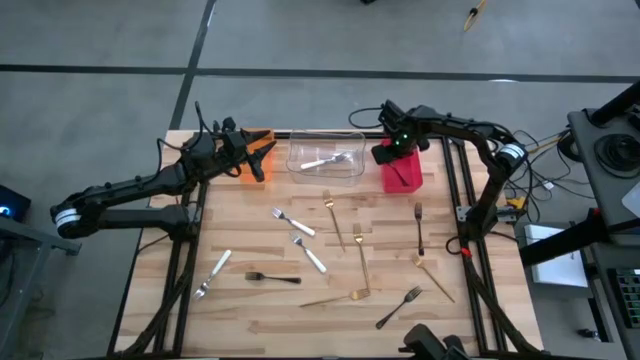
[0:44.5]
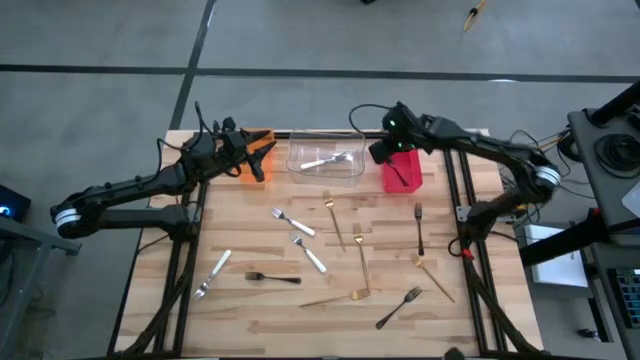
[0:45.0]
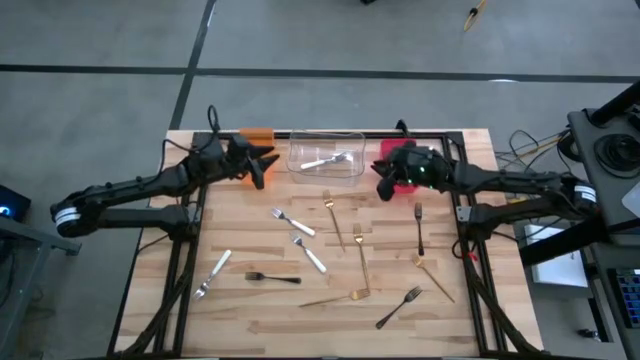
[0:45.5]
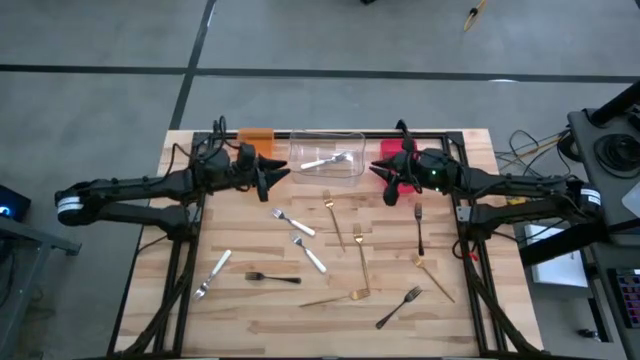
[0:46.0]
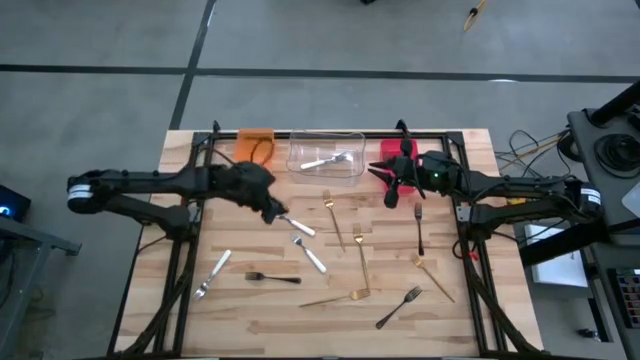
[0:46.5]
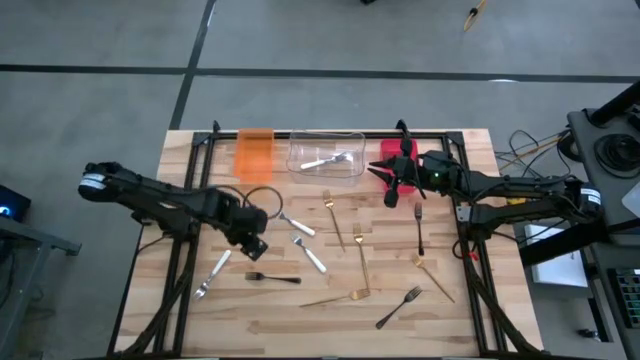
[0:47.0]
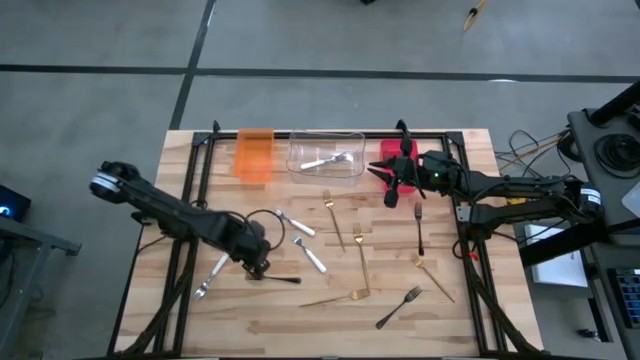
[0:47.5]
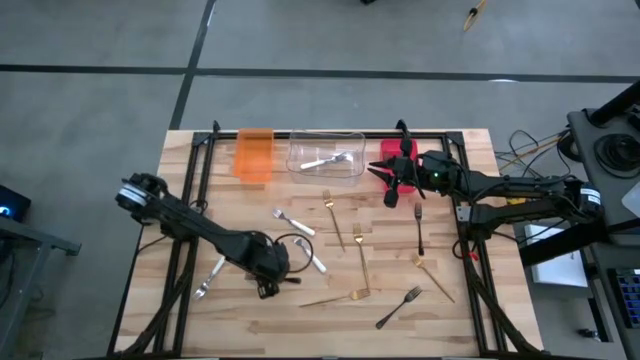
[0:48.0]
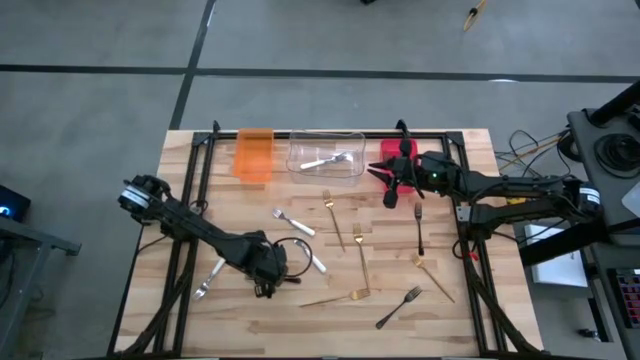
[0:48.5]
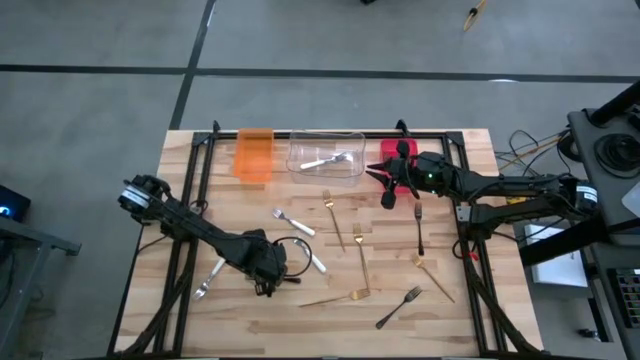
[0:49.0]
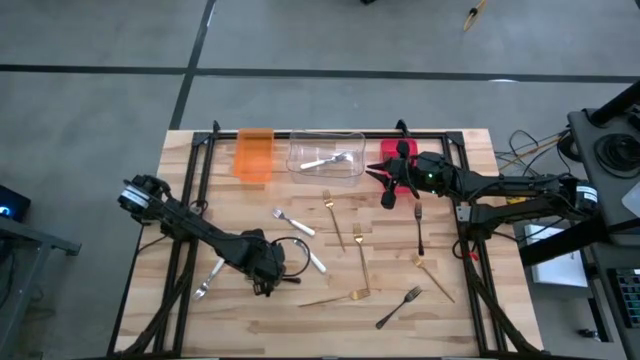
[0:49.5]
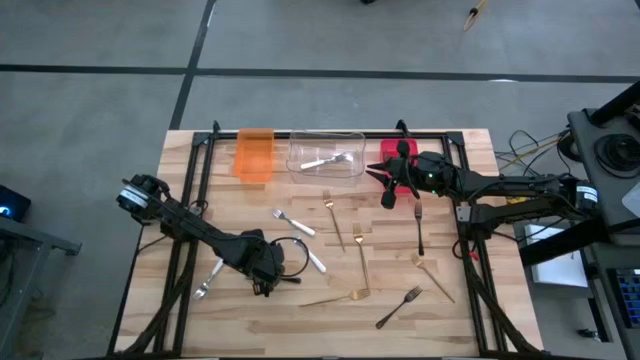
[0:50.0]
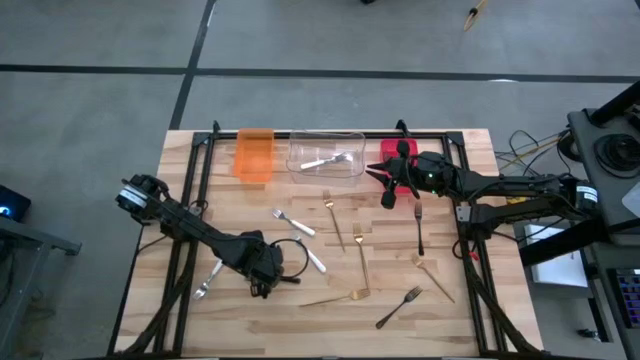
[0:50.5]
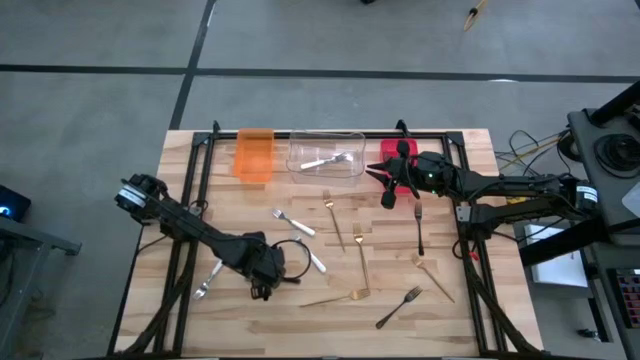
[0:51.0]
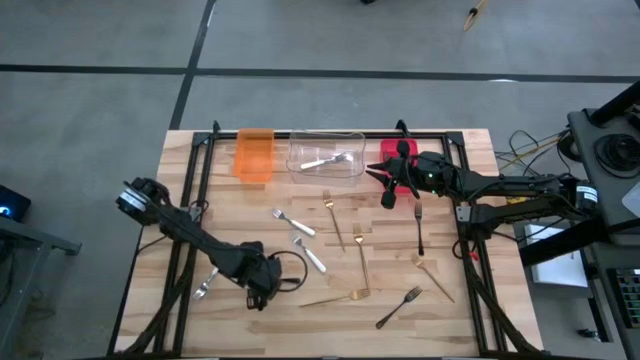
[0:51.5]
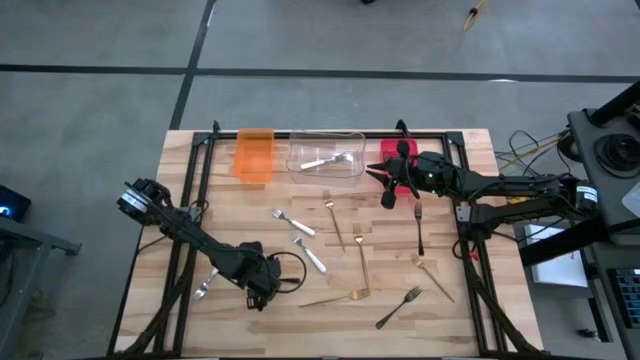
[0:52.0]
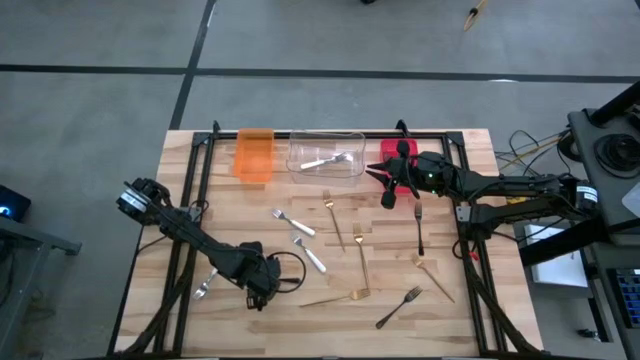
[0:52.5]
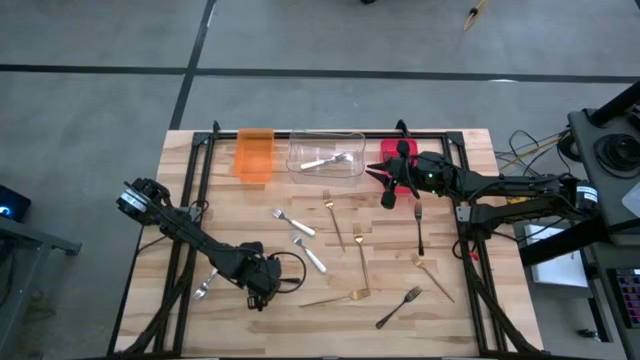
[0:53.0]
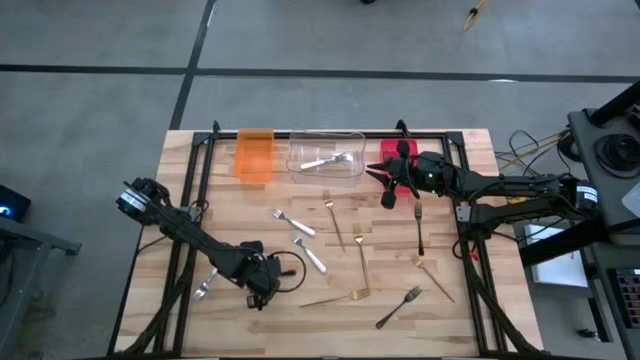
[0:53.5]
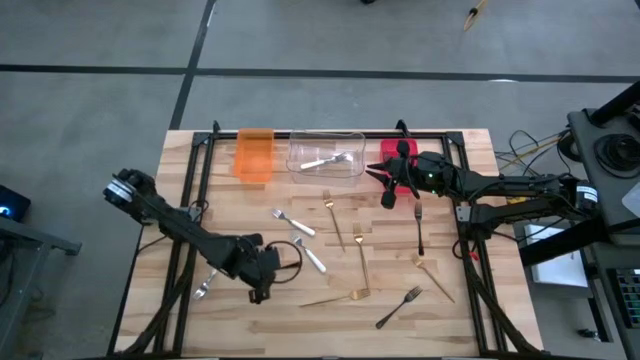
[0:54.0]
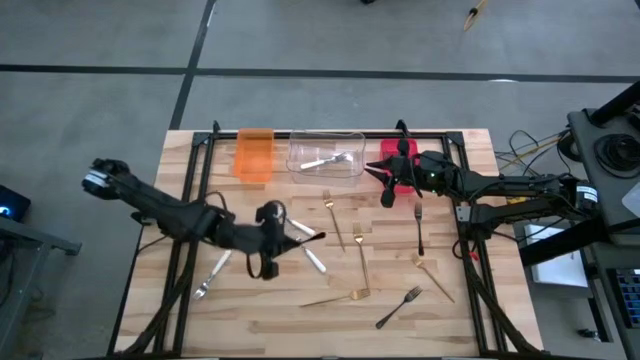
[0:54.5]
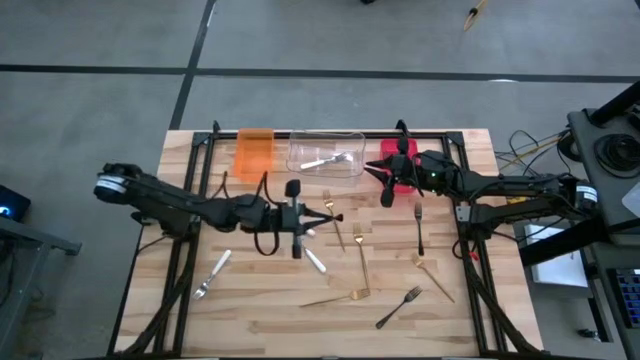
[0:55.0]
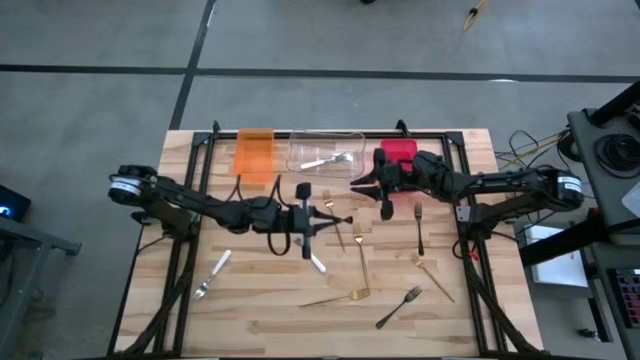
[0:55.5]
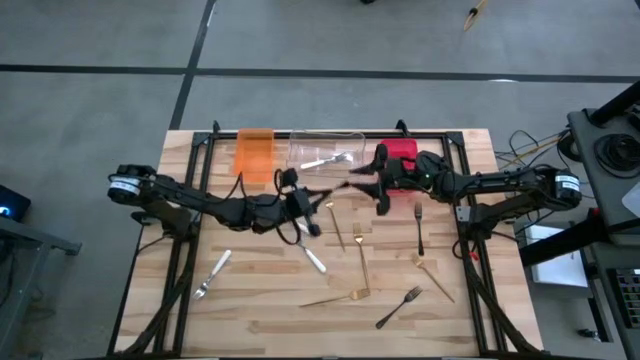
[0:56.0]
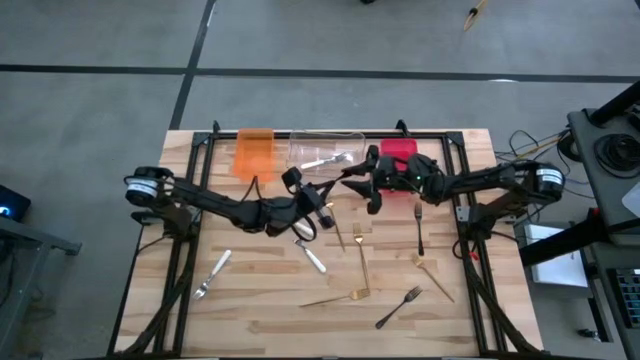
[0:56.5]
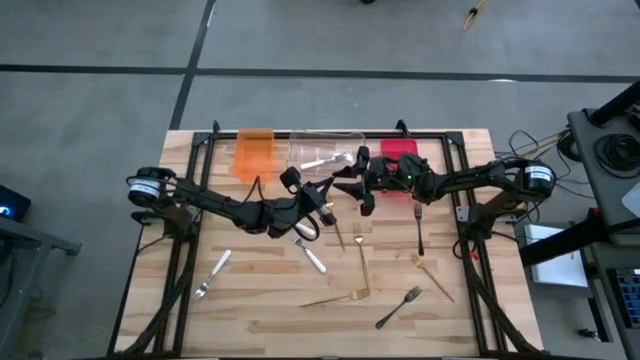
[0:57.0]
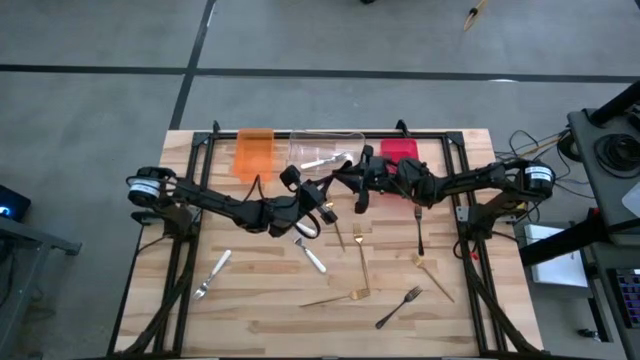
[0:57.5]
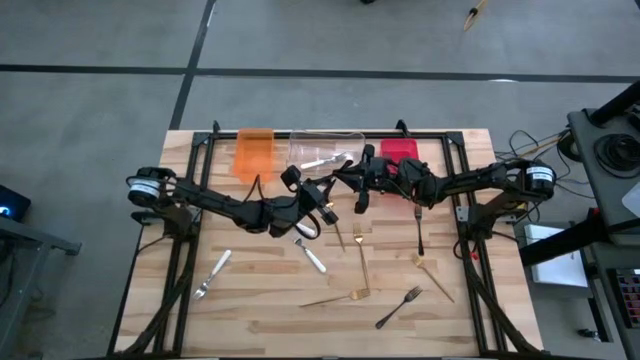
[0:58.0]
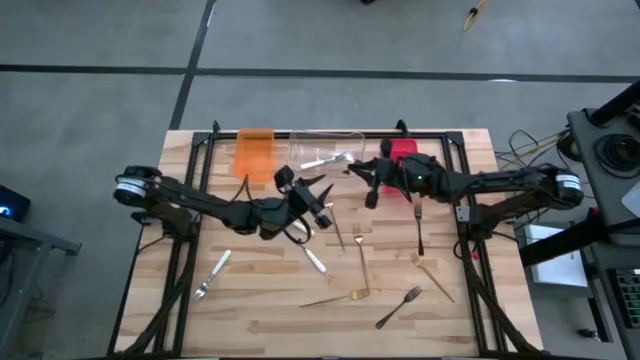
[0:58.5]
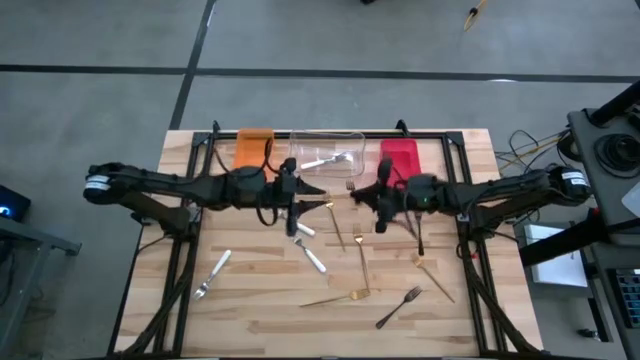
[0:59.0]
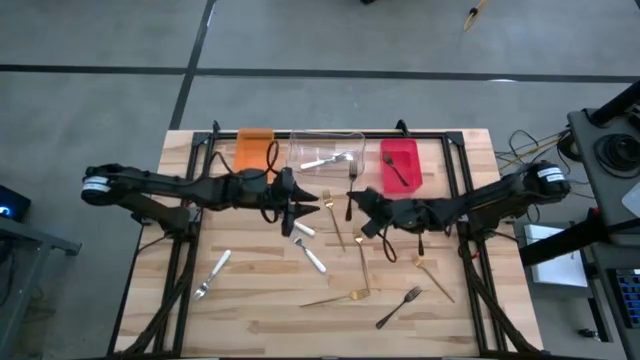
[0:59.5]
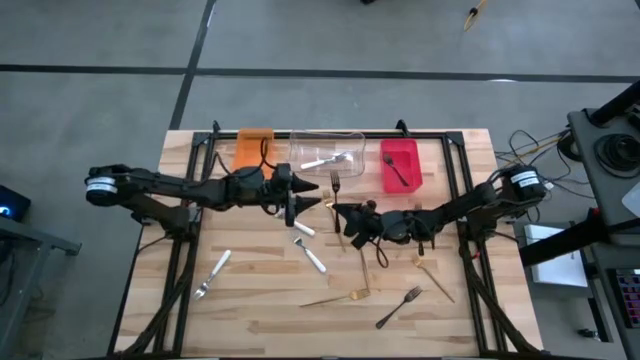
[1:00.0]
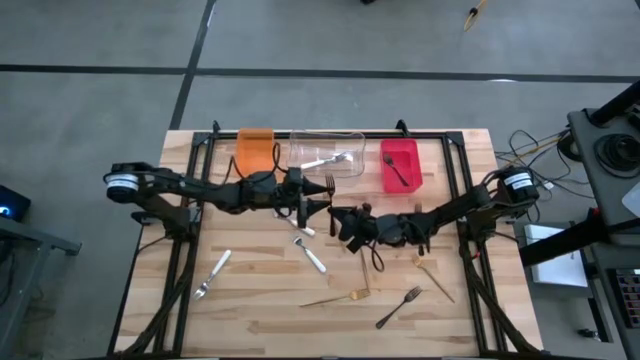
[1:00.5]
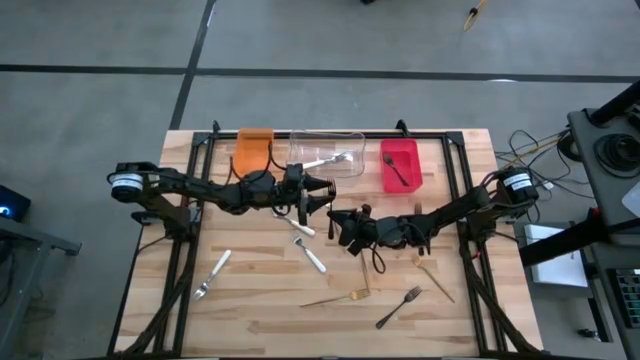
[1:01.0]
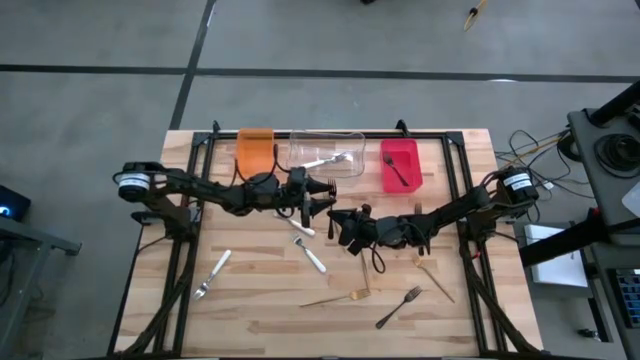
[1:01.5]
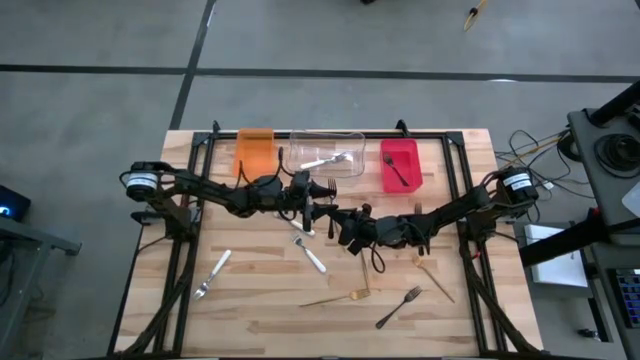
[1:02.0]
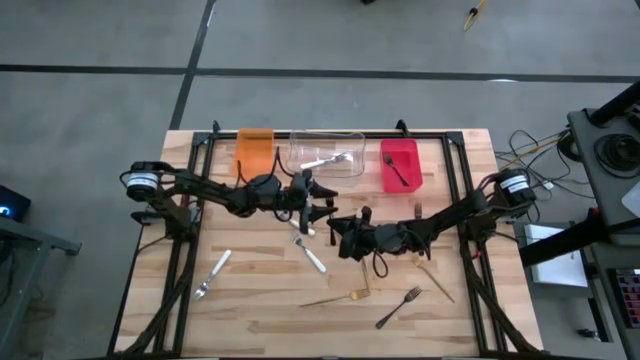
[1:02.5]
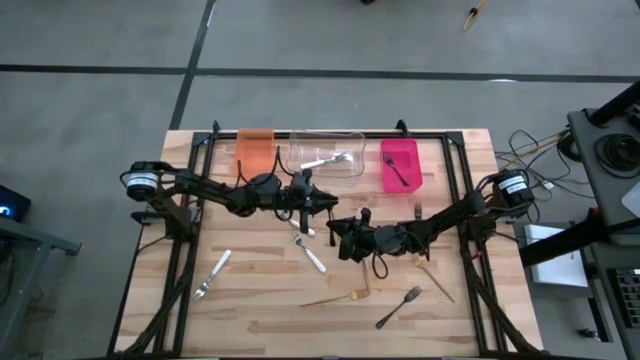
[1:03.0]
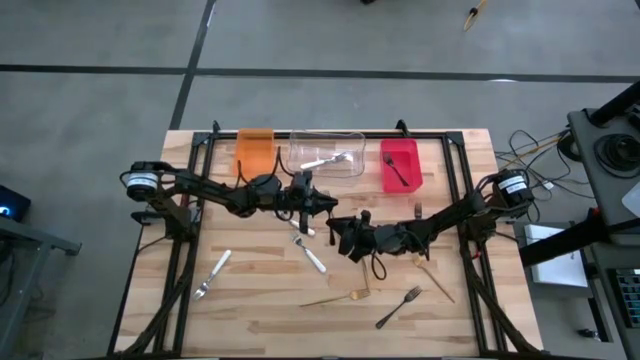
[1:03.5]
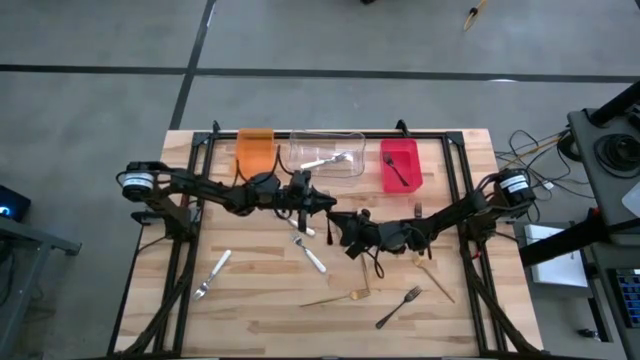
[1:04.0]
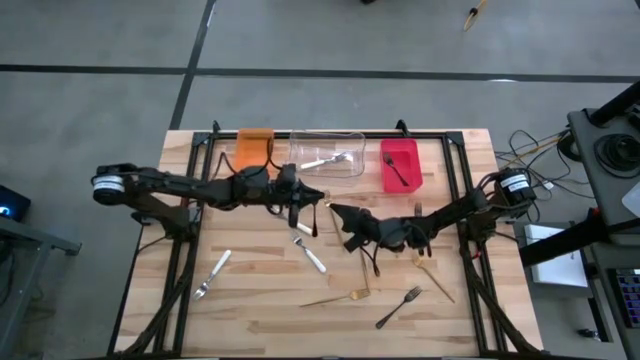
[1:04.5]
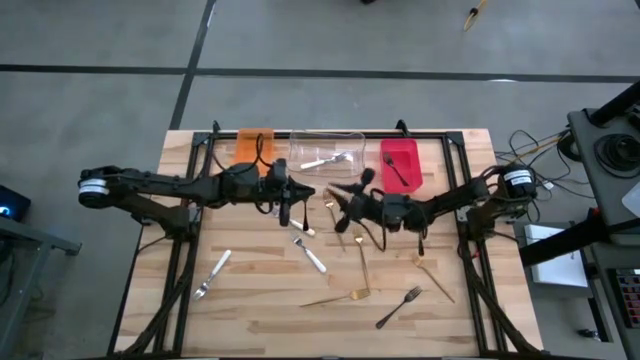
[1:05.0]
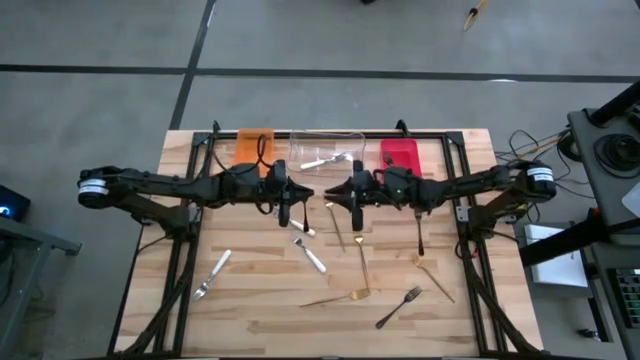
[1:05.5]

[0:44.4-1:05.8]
Task: Sort silverware by color (type)
Put the black fork into the orange bin

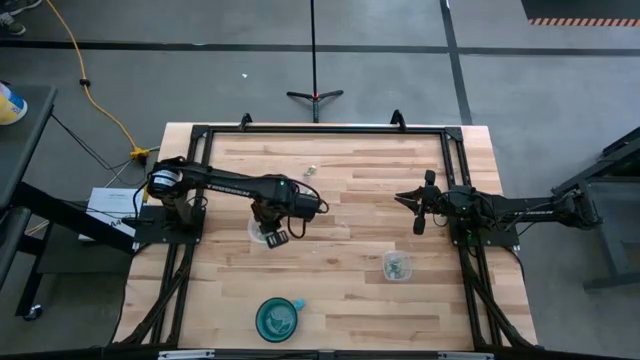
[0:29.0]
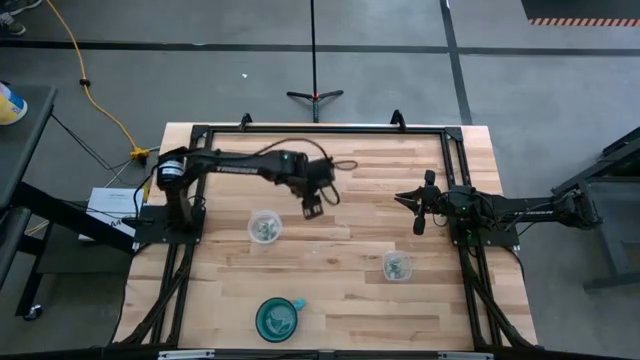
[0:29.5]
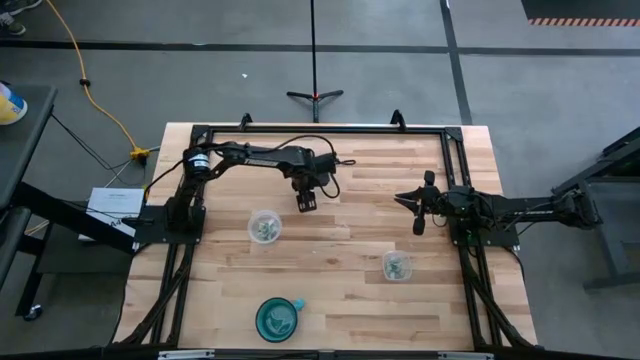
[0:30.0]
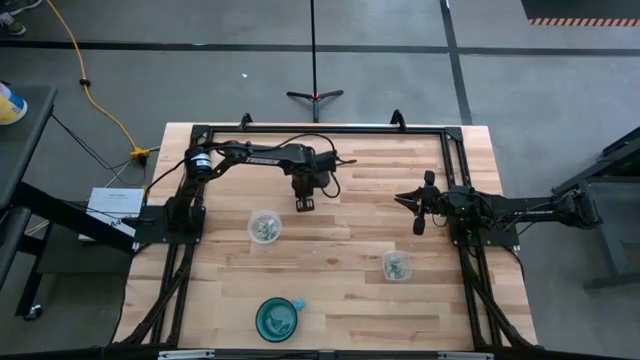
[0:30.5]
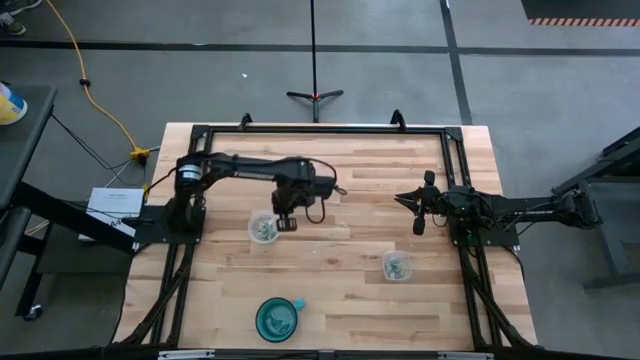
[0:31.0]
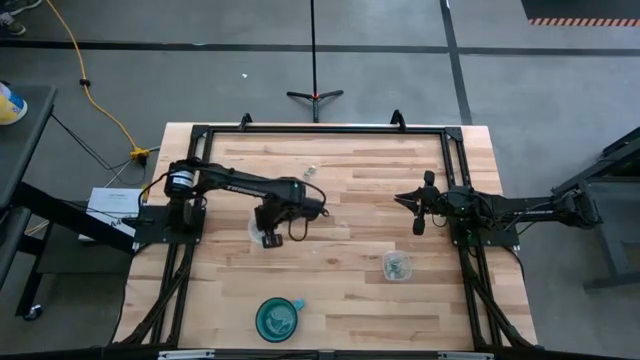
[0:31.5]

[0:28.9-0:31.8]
Task: Sort candy
Put the green candy into the circle transparent bin
